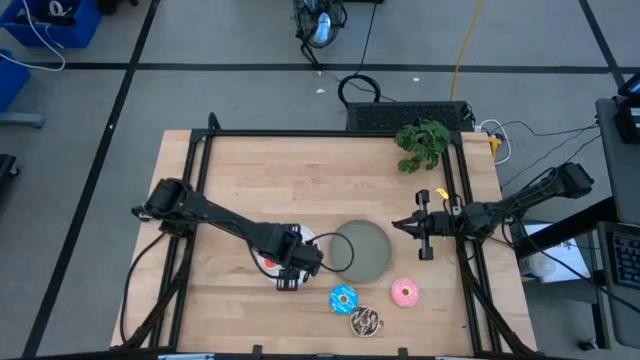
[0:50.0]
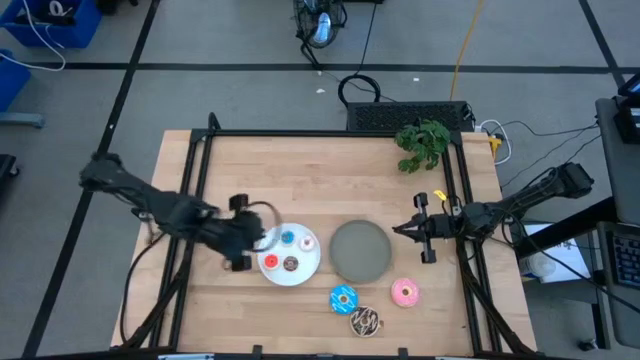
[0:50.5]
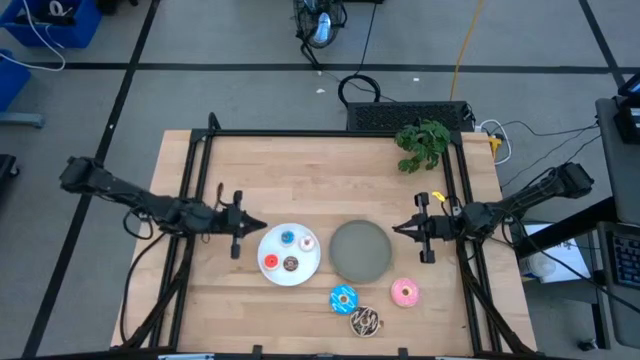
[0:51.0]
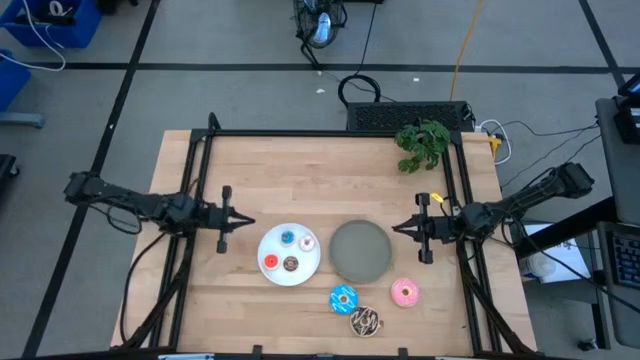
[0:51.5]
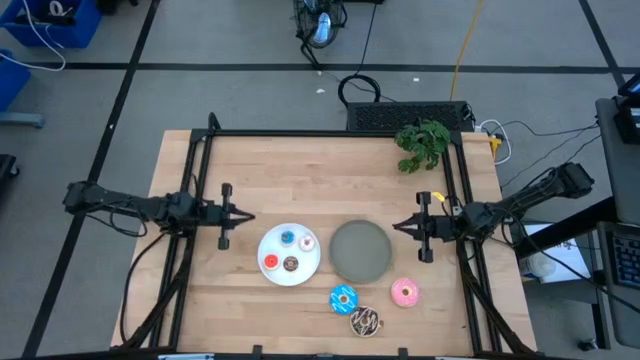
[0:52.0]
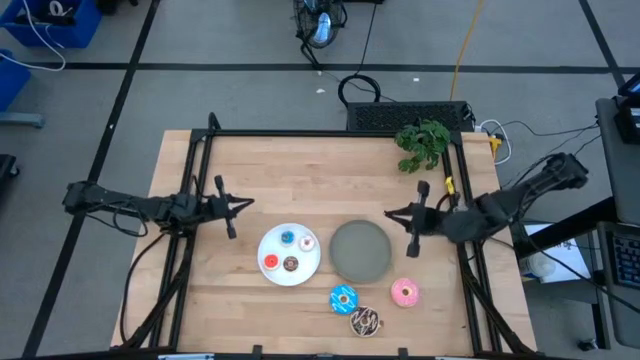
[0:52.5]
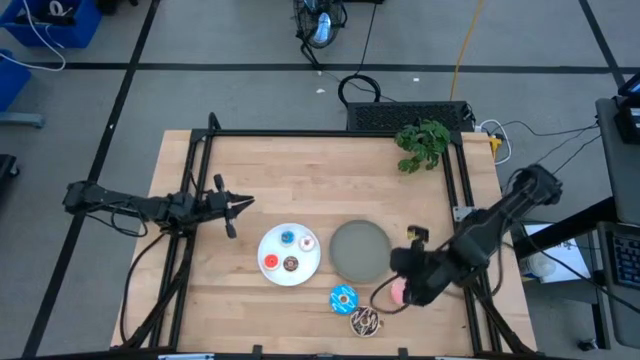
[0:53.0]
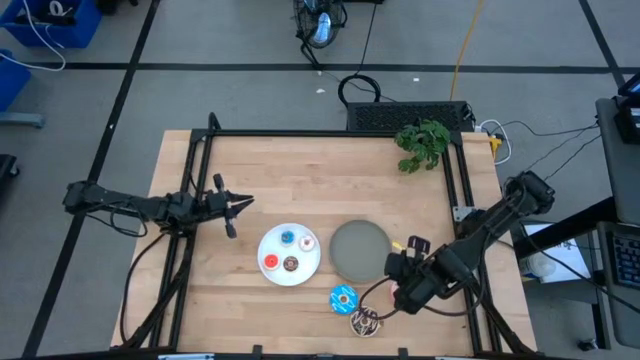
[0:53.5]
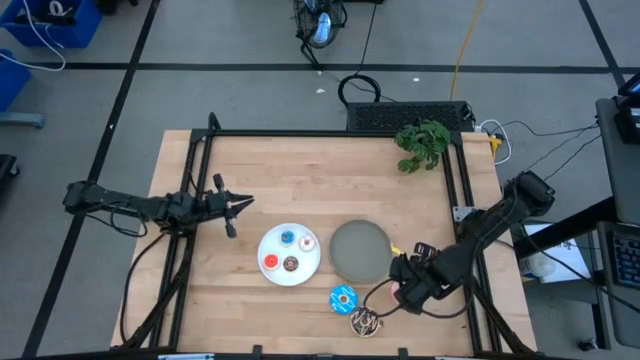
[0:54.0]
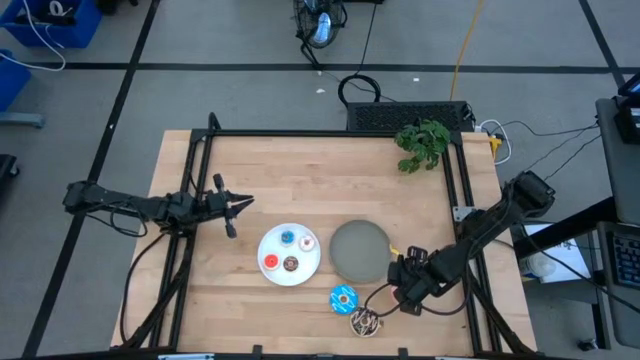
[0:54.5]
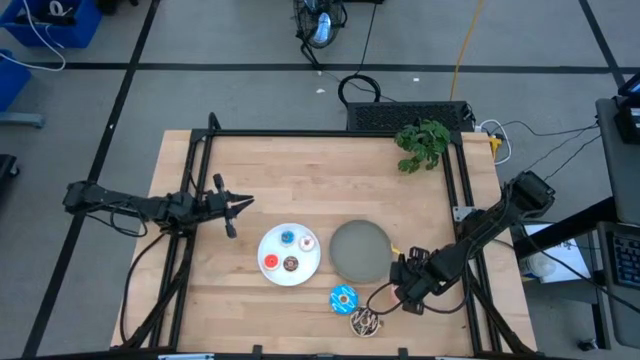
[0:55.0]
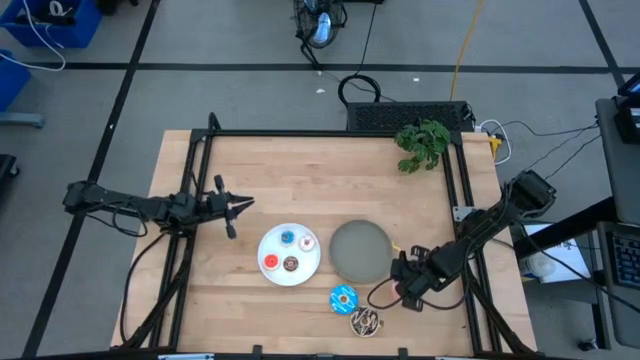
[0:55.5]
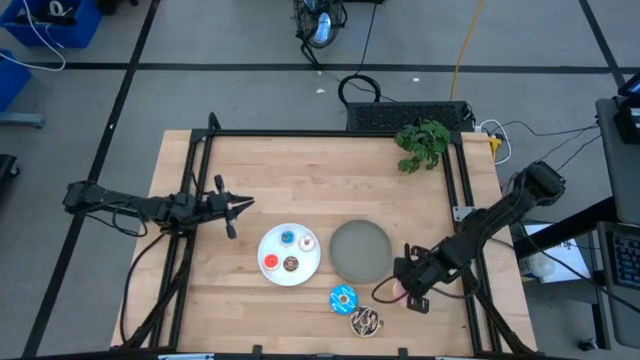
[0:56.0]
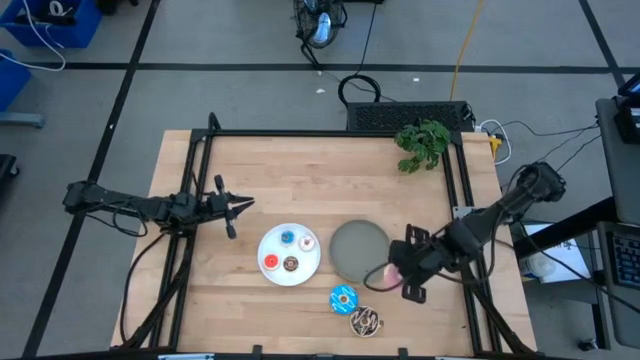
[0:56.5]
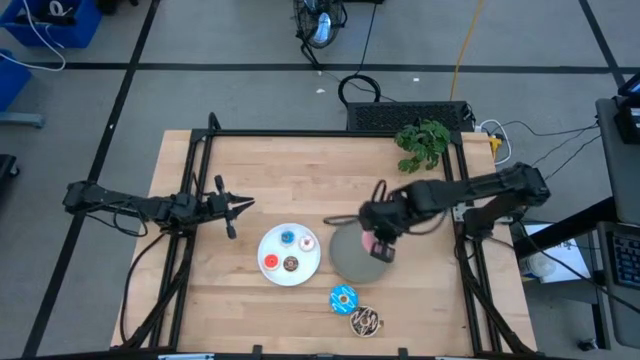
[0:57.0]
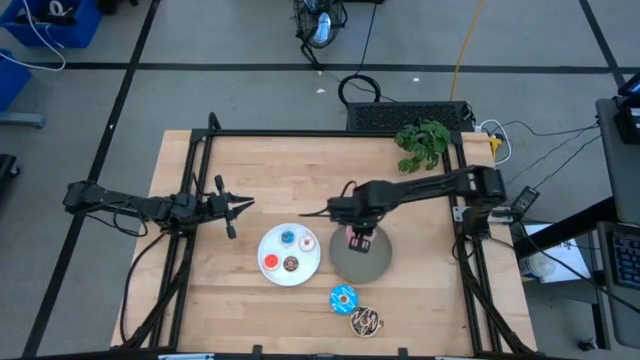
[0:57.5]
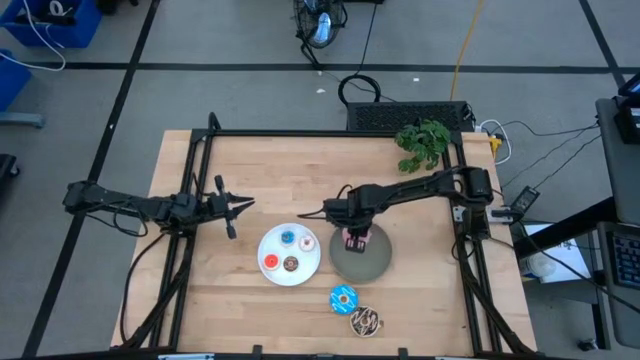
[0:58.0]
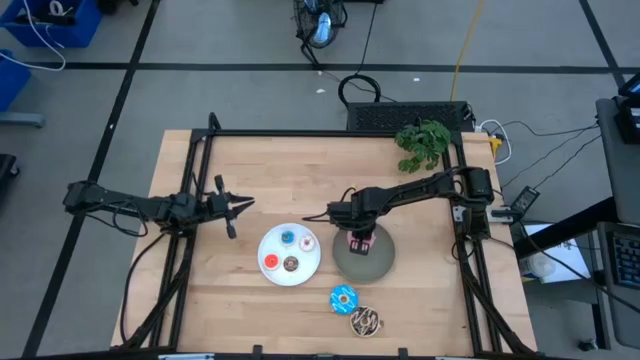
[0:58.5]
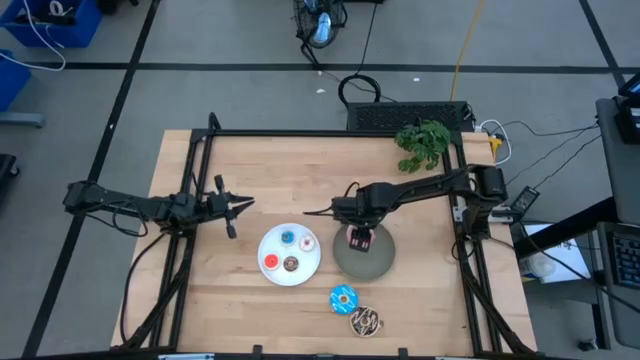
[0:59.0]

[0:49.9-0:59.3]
Task: Pick & Place donuts
Put the large pink donut on the gray plate

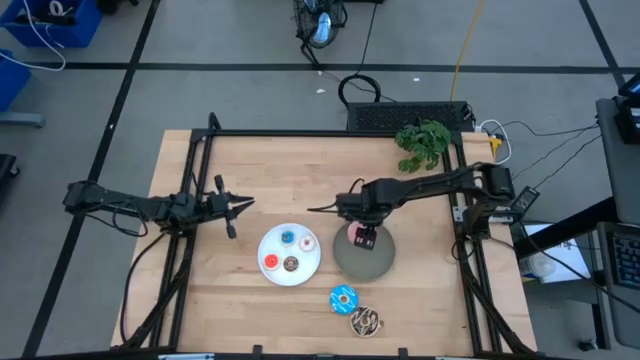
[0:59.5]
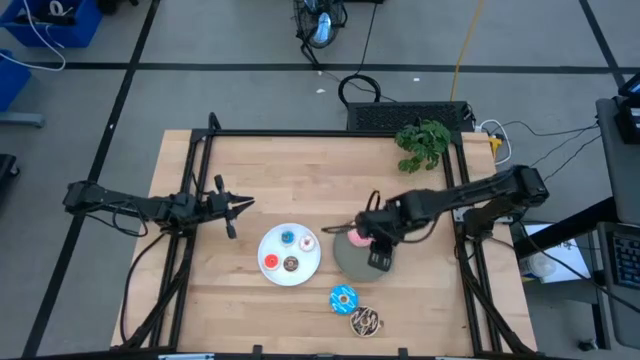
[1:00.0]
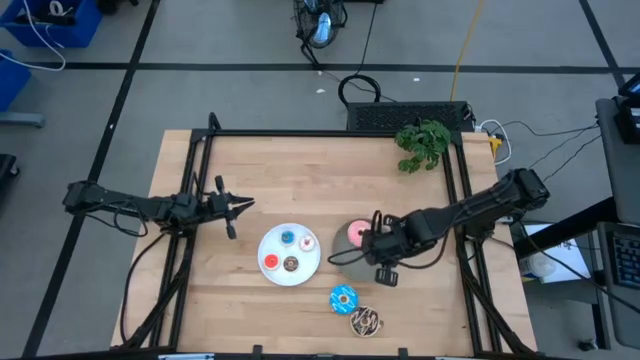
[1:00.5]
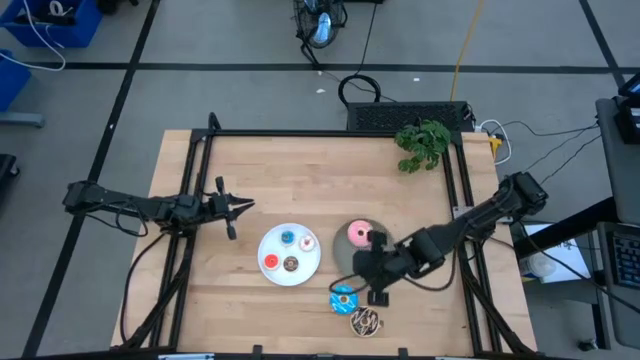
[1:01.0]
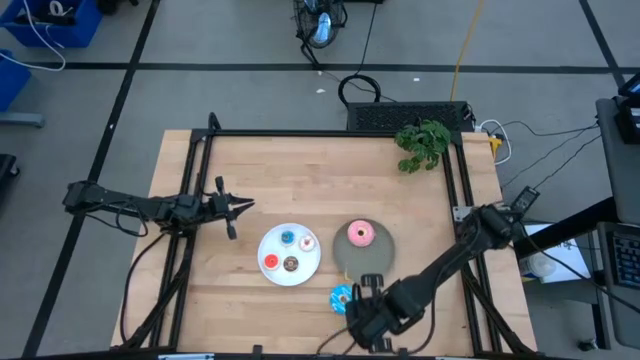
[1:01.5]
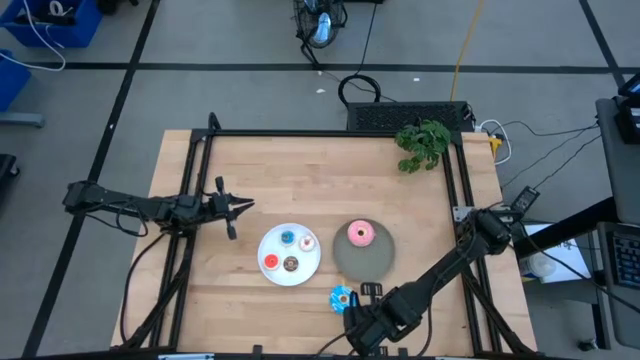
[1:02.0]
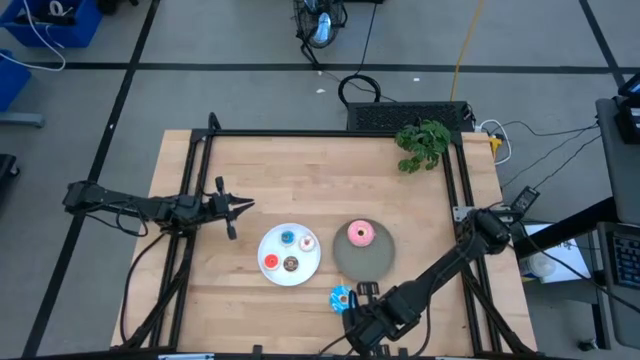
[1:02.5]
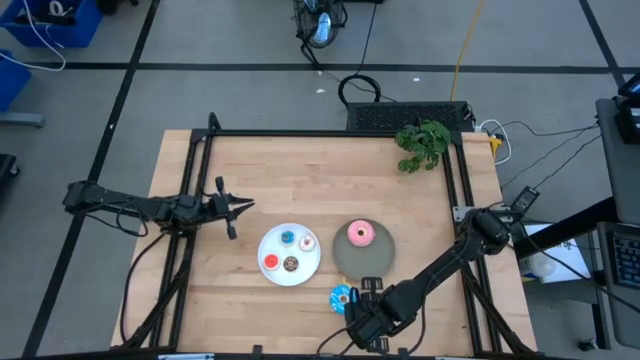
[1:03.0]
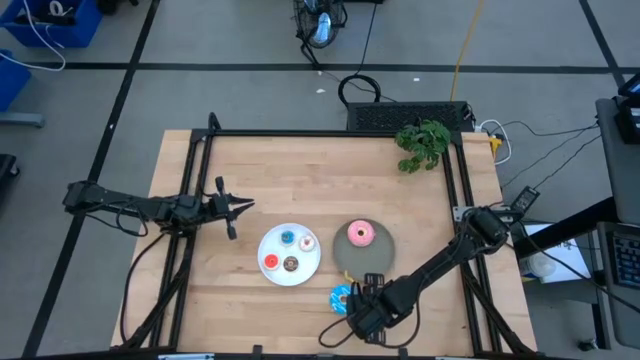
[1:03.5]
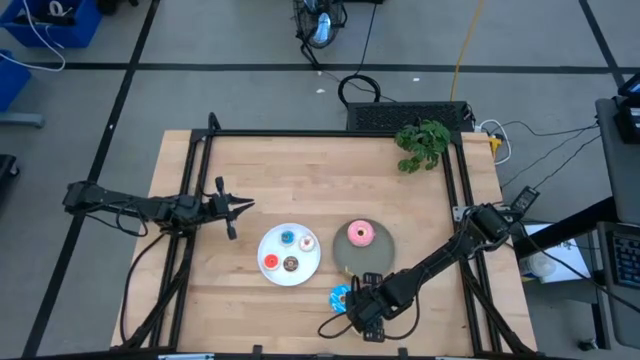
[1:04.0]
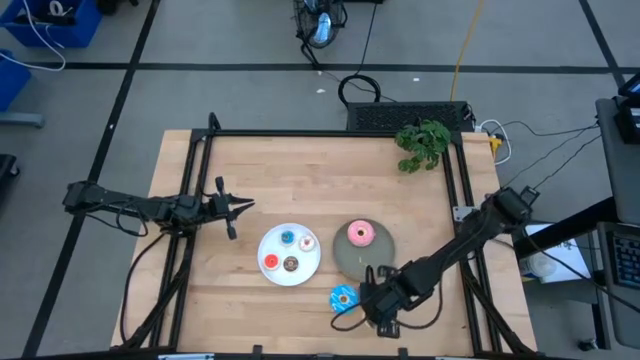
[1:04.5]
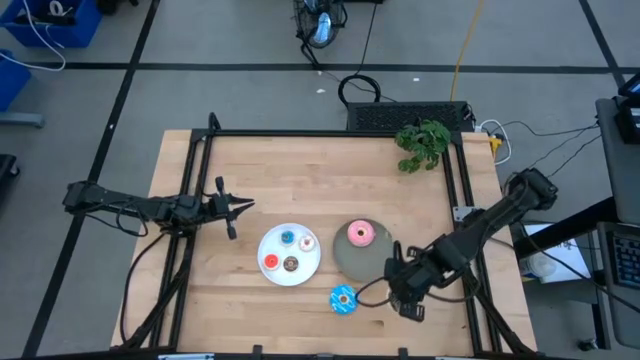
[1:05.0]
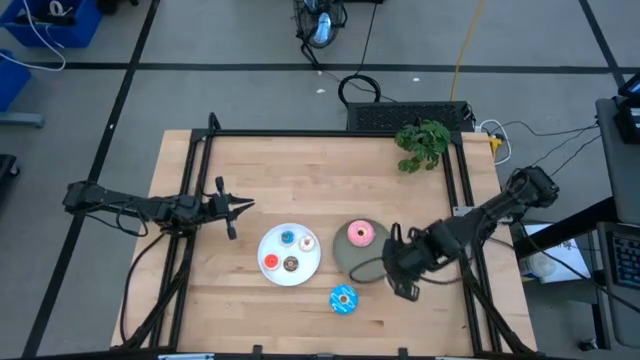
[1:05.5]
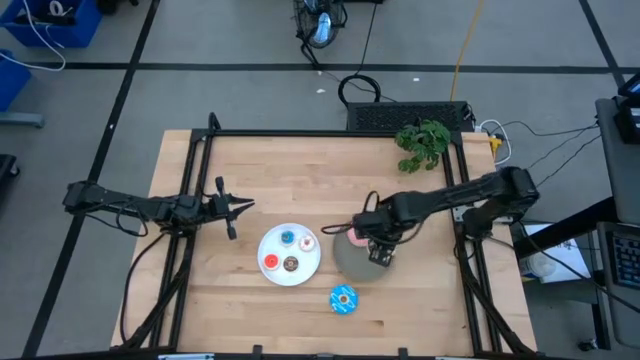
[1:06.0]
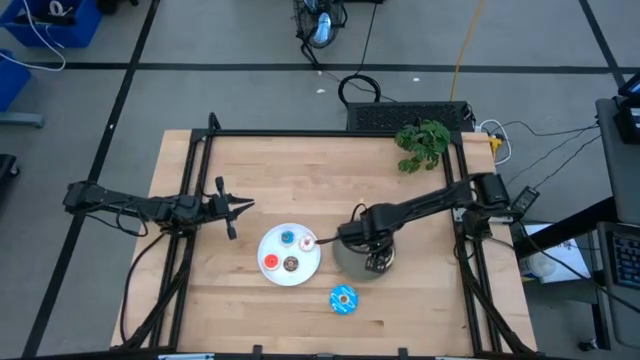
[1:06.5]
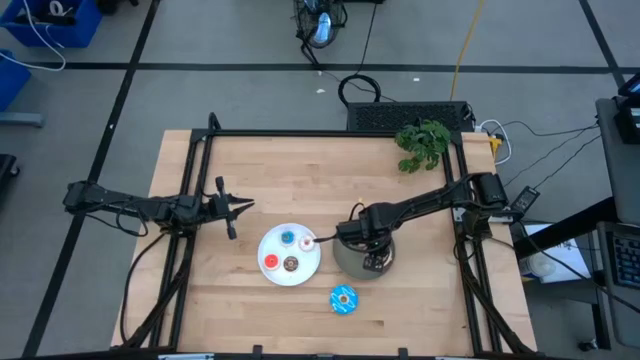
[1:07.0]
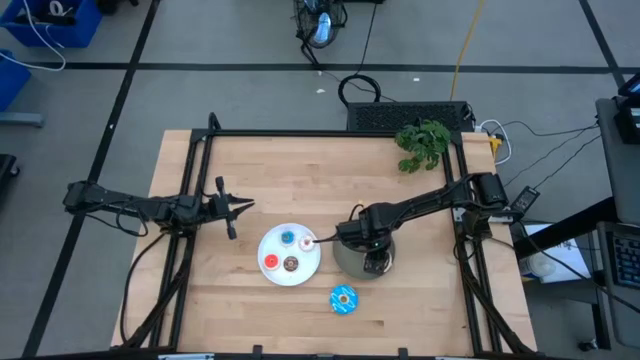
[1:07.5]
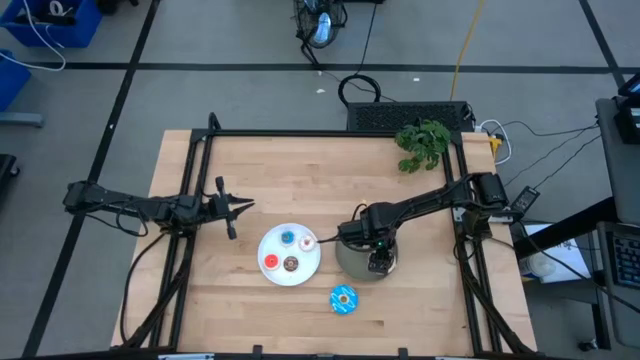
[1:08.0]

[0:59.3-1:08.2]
Put the large black donut on the gray plate

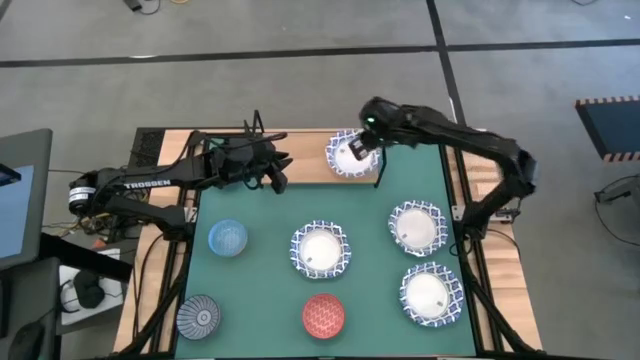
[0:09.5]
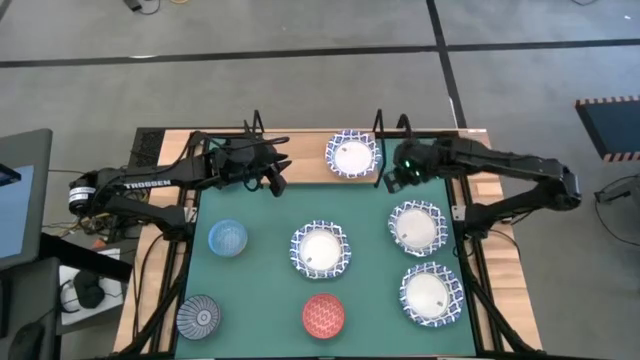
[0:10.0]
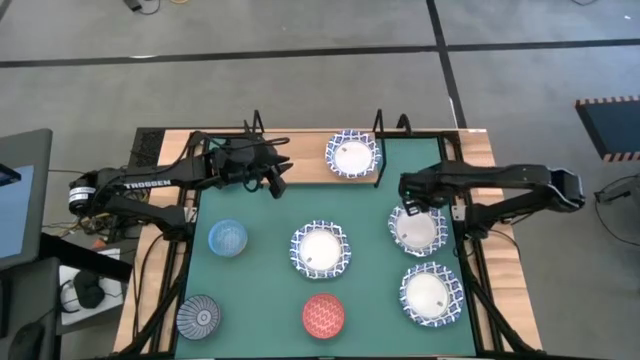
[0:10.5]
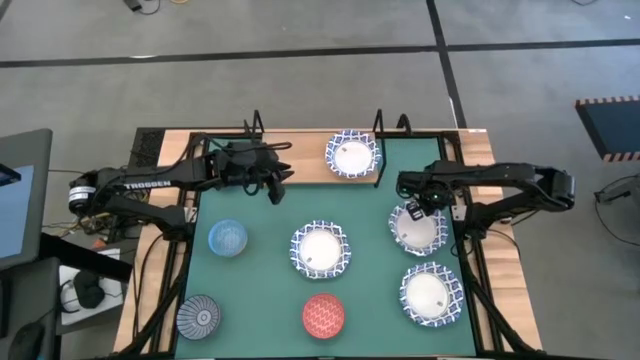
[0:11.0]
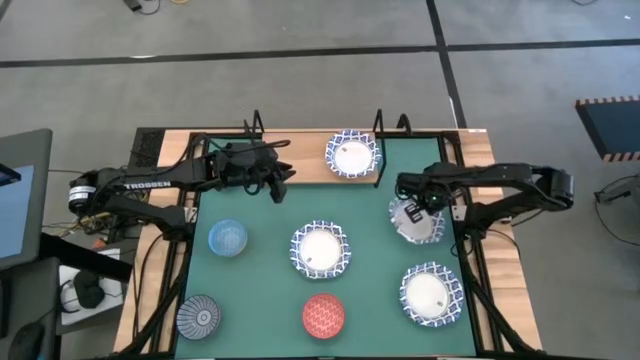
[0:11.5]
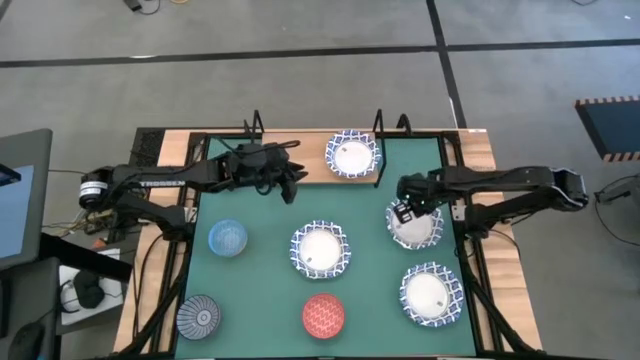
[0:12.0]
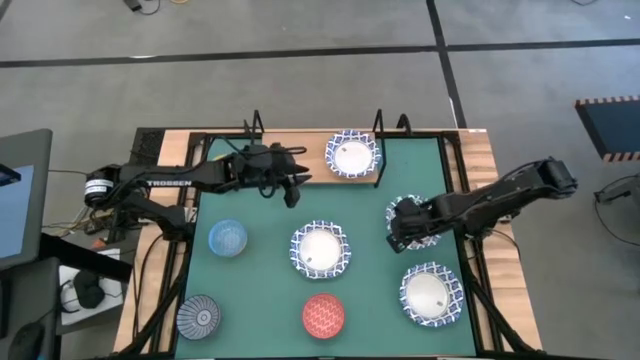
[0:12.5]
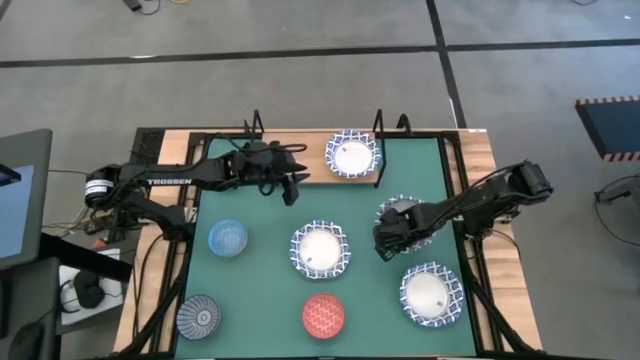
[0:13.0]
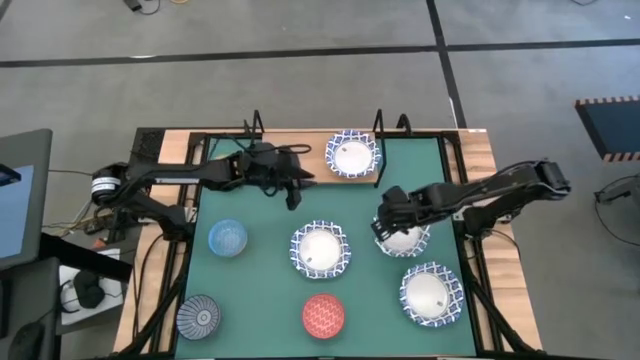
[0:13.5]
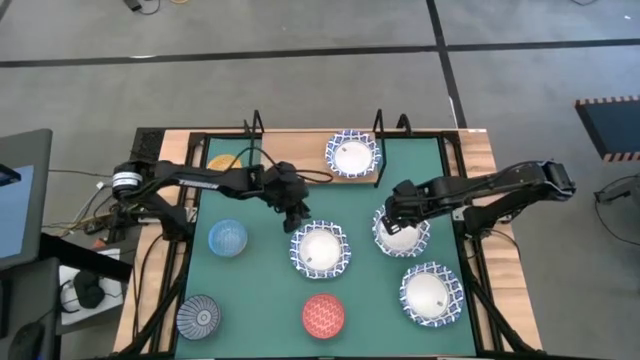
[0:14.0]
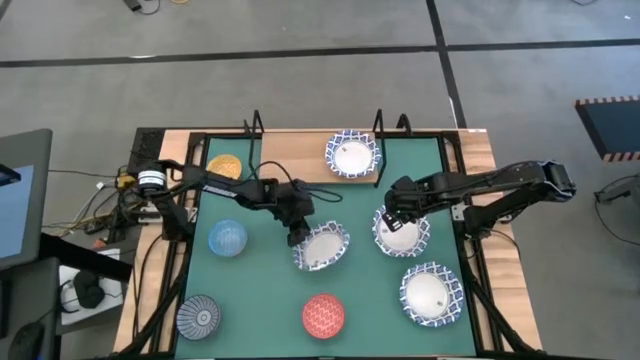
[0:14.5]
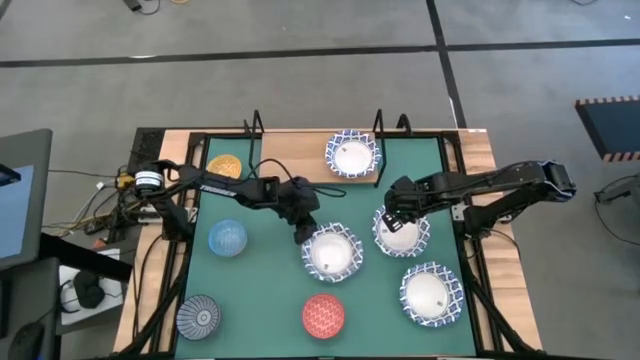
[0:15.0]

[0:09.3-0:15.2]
Task: Place and stack bowls onto a shelf
Stack the white bowl on top of the other white bowl on the shelf
